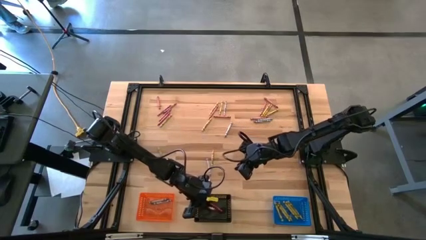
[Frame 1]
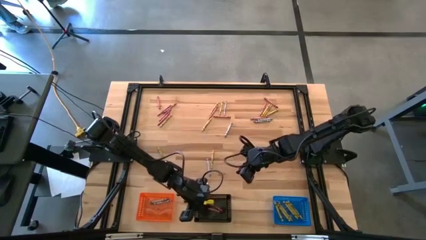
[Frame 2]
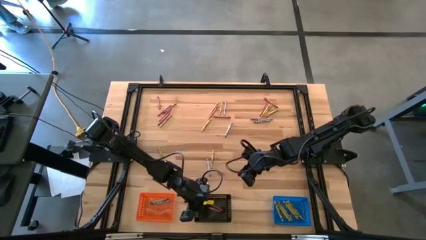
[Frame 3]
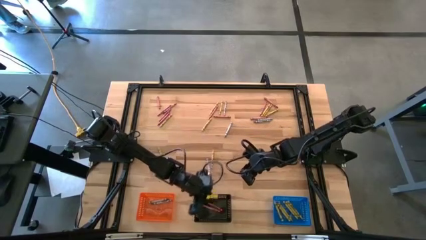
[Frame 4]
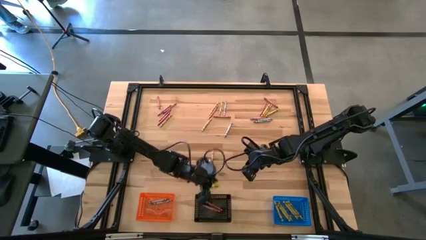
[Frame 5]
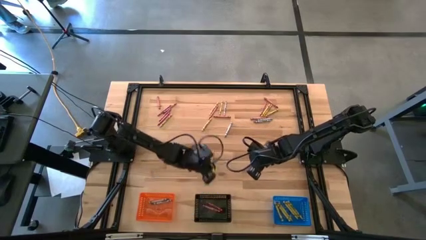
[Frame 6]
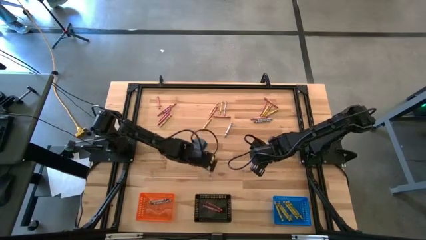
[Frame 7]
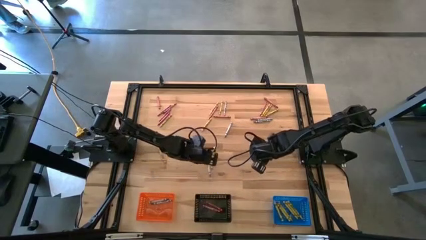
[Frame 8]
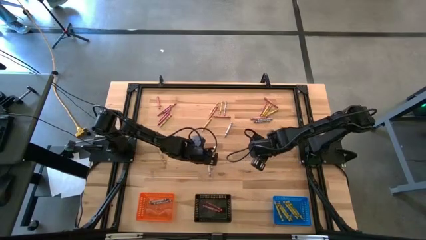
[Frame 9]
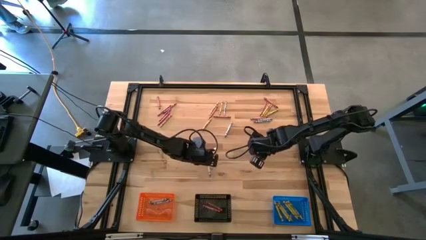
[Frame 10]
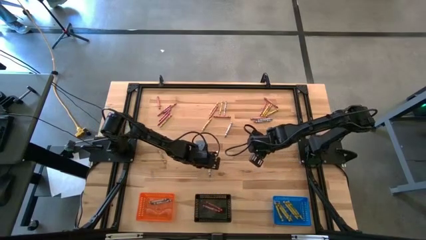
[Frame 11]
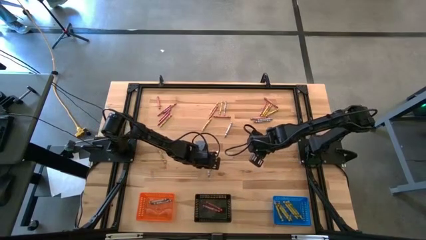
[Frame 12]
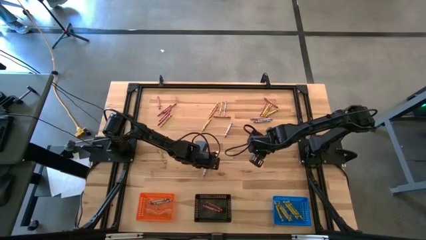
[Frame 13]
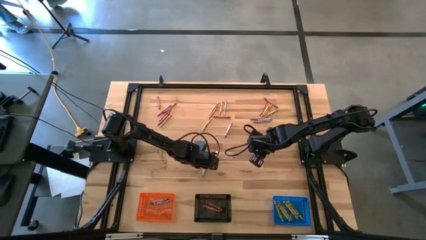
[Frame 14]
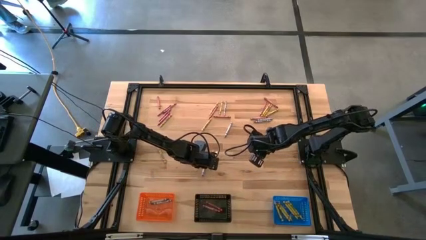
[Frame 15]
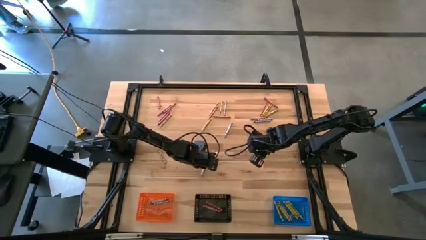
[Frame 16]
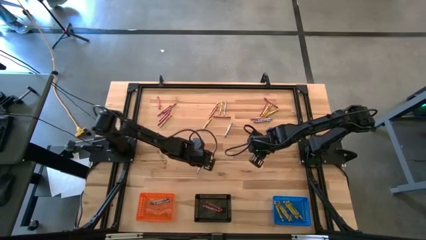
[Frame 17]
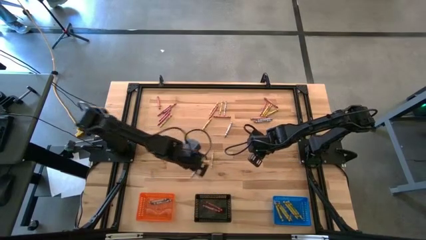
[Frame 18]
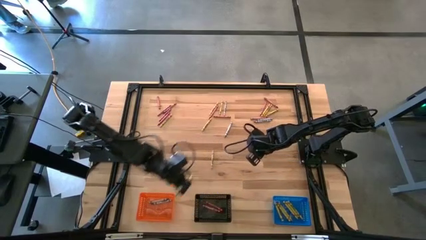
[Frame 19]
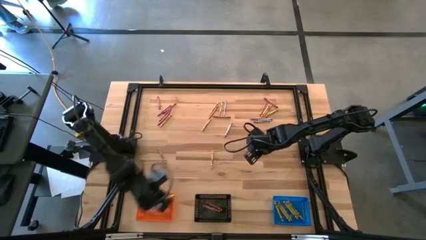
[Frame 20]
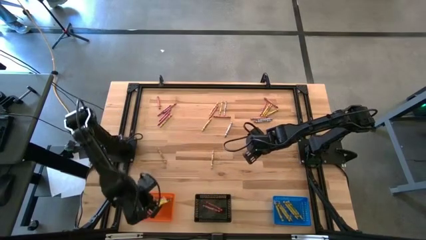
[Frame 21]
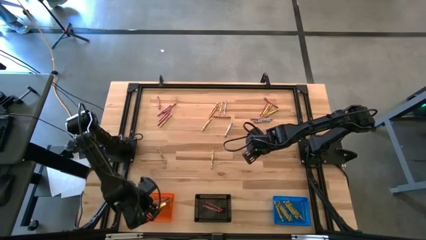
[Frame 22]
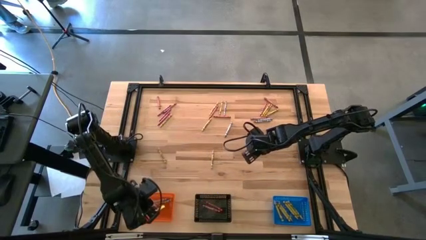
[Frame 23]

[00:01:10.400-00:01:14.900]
Task: Sort crayons
Put the gray crayon into the orange bin

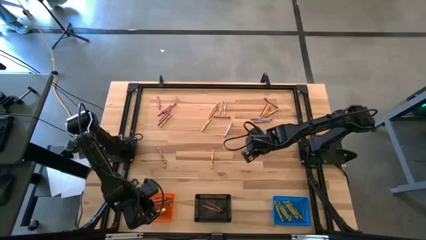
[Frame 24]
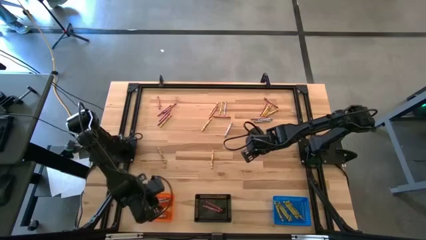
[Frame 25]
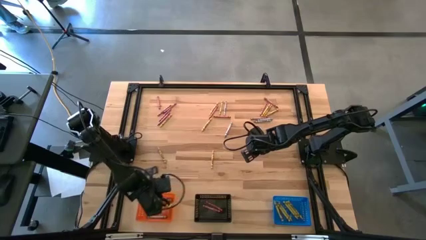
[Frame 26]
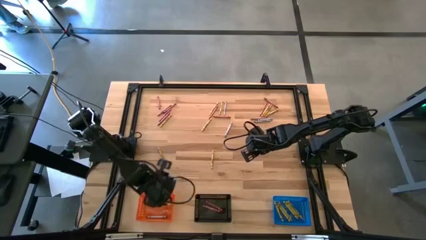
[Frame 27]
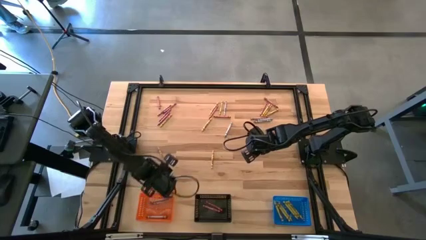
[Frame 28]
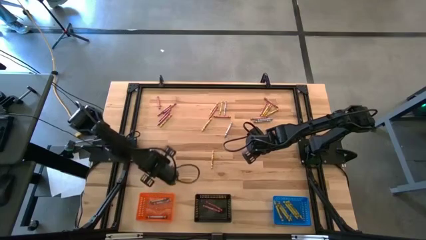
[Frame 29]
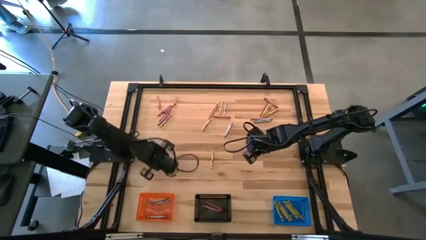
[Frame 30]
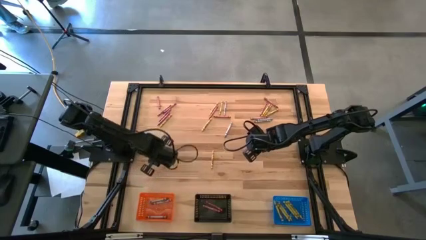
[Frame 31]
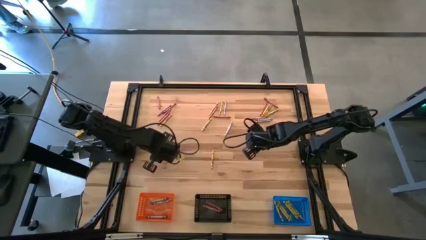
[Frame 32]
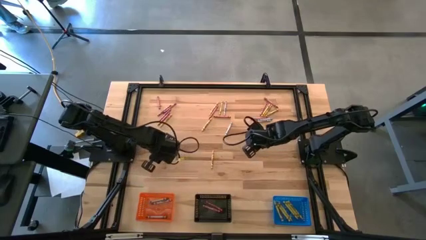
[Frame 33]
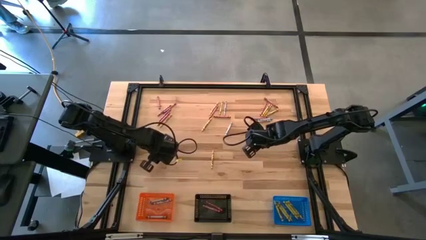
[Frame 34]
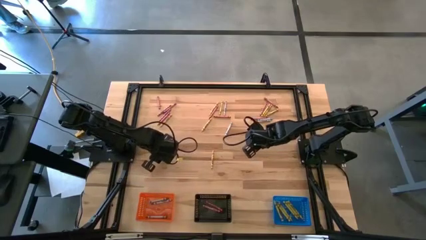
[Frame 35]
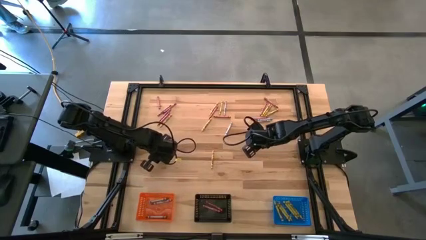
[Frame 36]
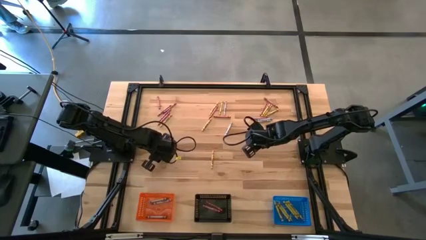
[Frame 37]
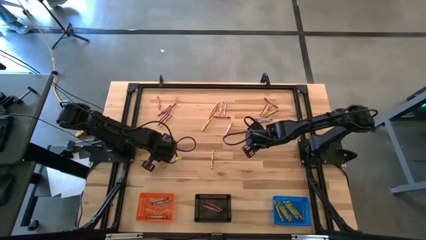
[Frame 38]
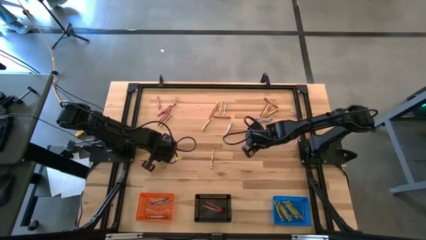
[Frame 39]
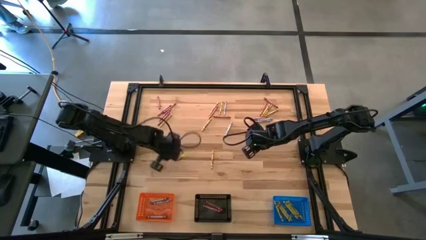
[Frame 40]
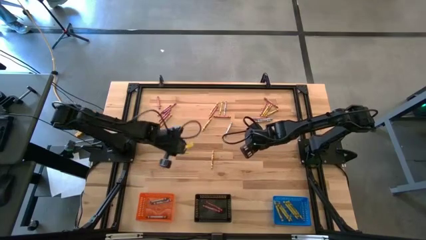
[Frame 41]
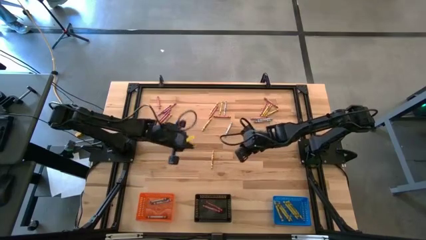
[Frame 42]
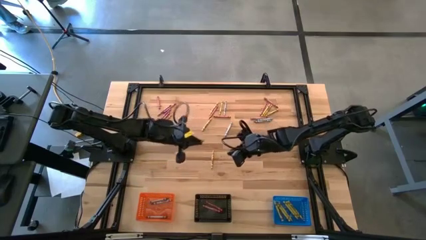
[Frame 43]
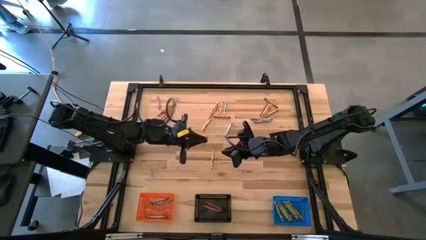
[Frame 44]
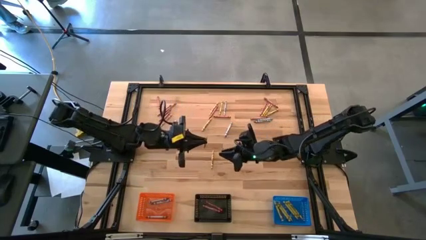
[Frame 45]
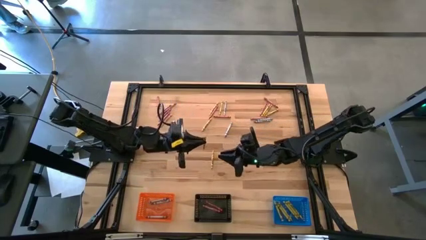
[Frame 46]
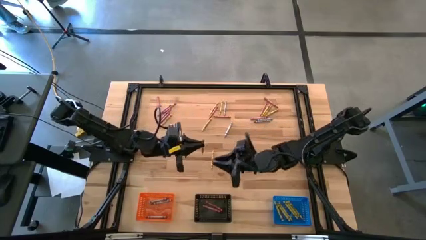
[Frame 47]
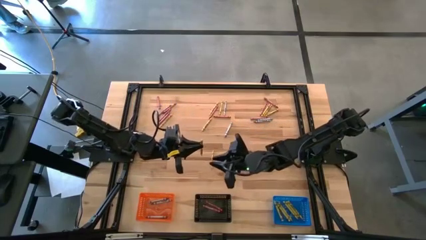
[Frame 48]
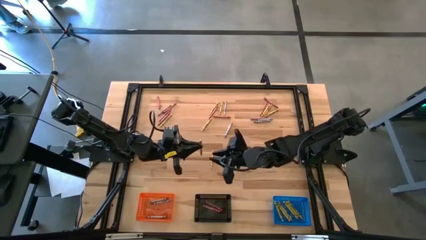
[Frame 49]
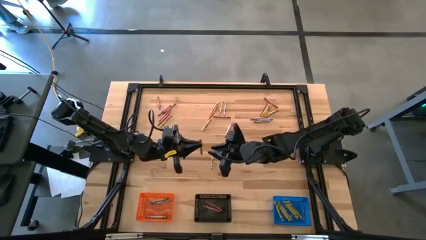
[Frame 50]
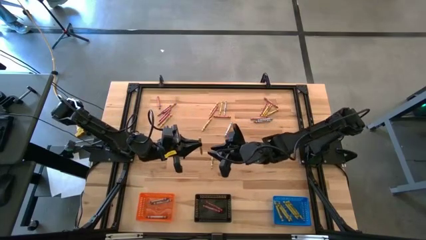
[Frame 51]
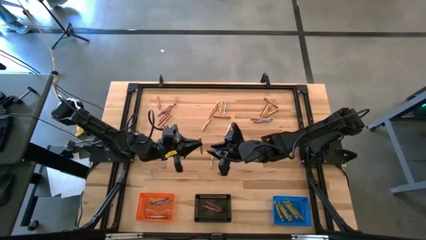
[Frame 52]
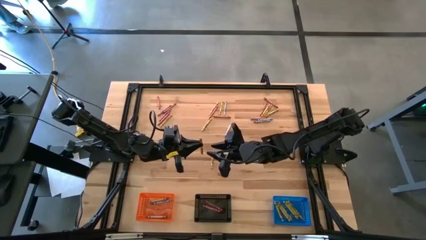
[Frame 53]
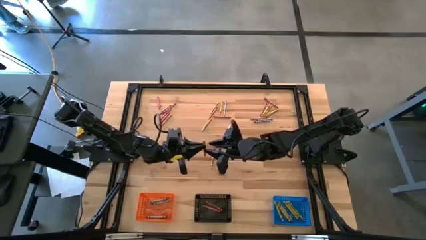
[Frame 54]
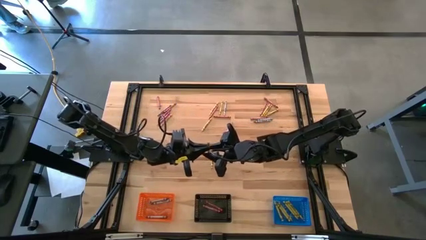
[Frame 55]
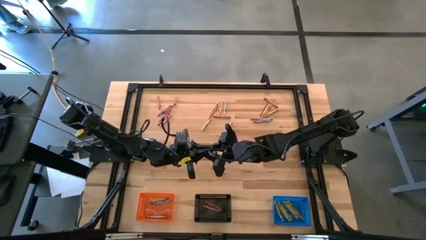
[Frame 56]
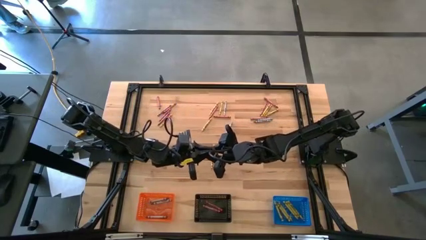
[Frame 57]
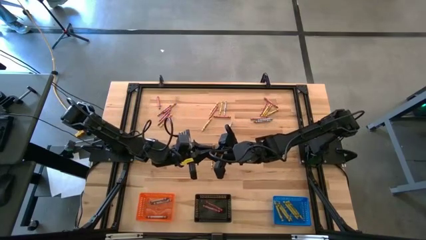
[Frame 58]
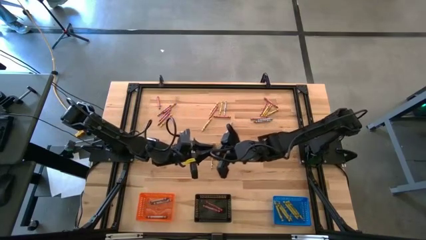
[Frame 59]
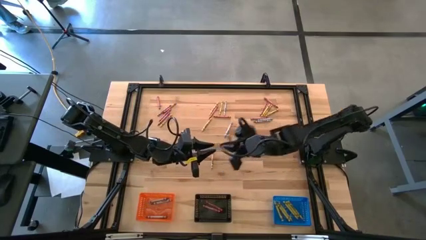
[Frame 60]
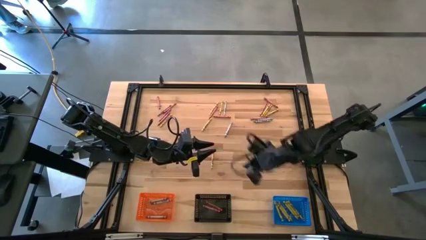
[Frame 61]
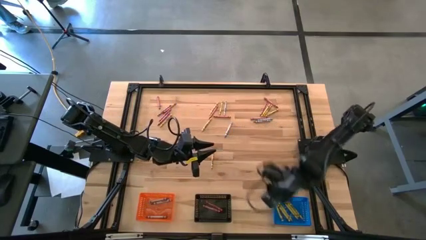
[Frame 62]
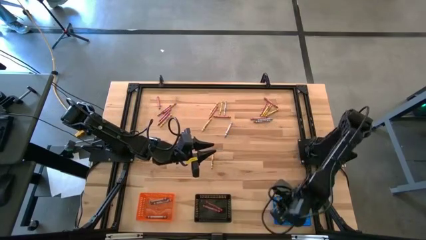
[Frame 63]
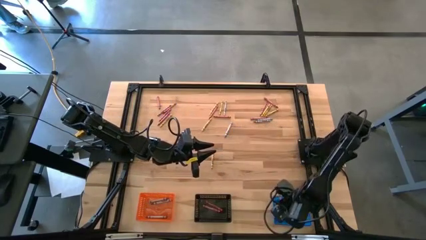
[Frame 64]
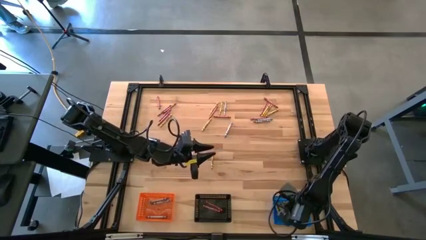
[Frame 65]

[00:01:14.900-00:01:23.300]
Put the yellow crayon into the blue bin
